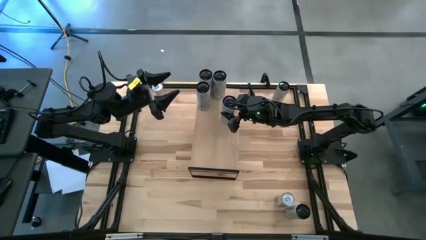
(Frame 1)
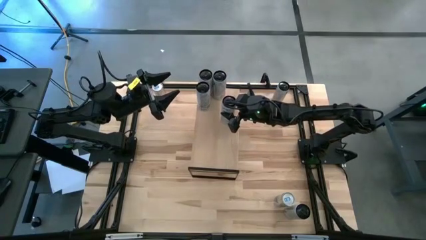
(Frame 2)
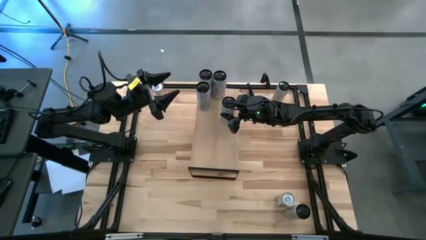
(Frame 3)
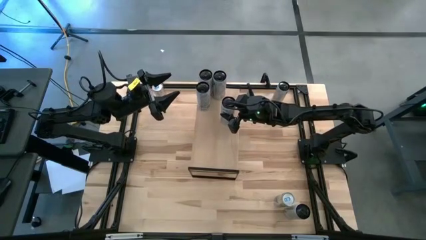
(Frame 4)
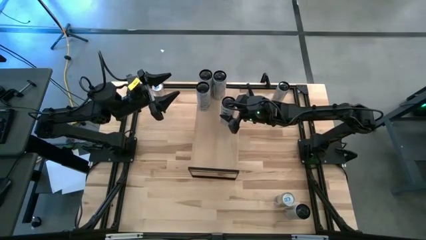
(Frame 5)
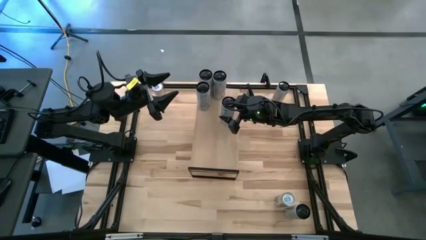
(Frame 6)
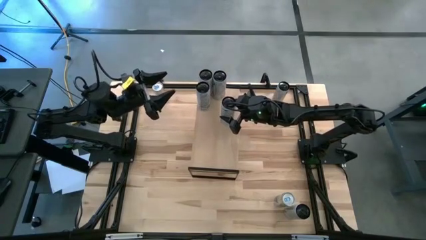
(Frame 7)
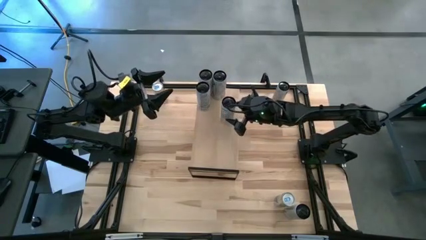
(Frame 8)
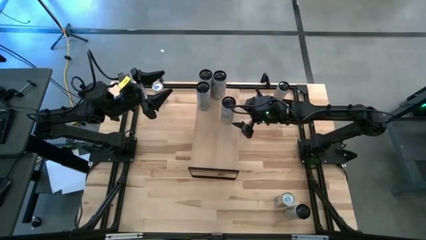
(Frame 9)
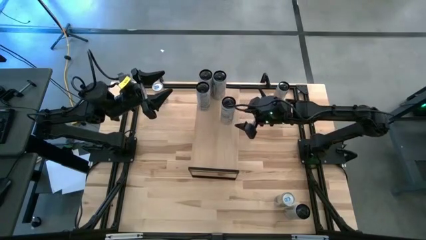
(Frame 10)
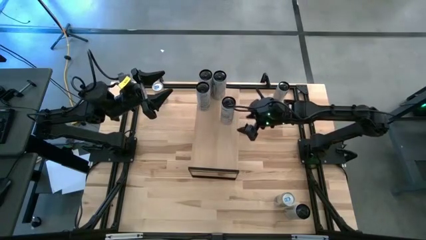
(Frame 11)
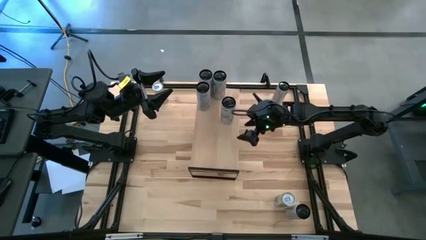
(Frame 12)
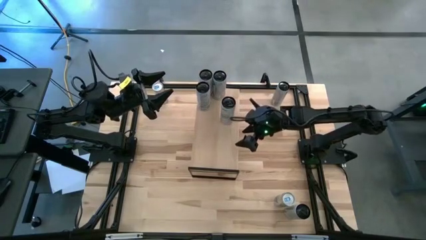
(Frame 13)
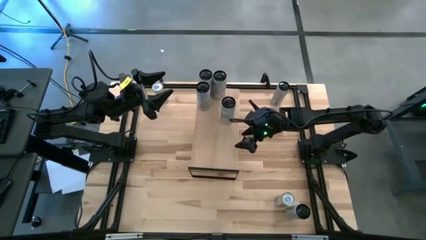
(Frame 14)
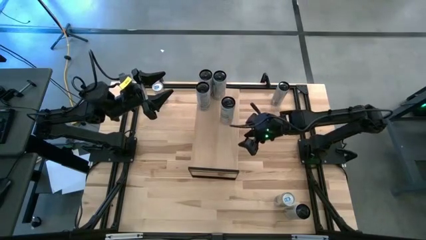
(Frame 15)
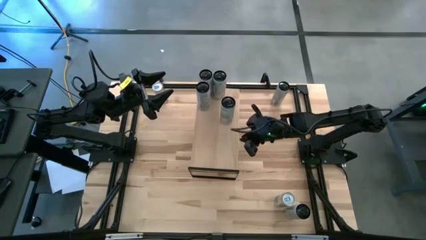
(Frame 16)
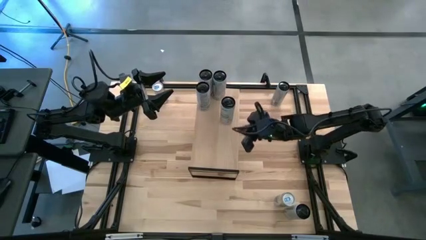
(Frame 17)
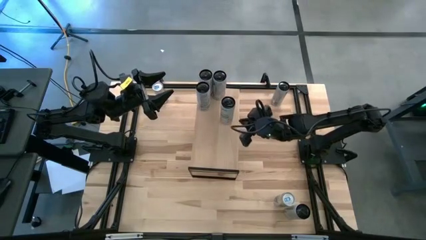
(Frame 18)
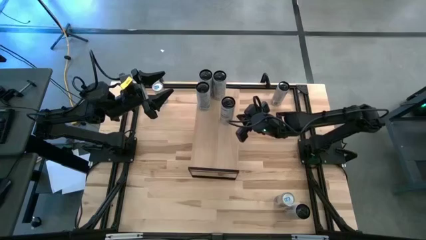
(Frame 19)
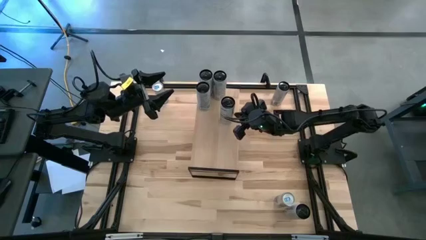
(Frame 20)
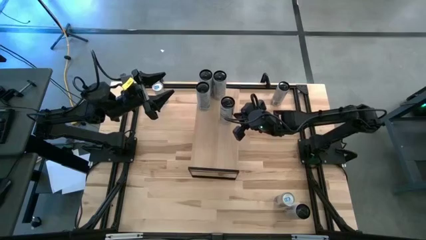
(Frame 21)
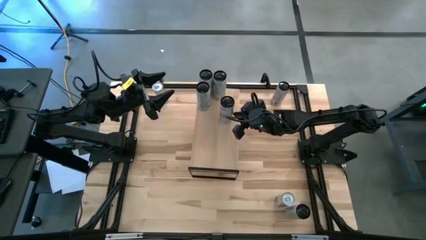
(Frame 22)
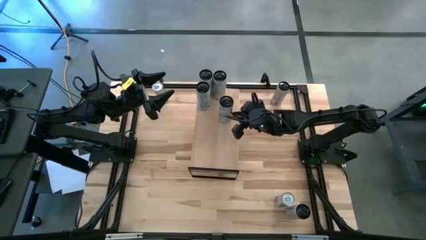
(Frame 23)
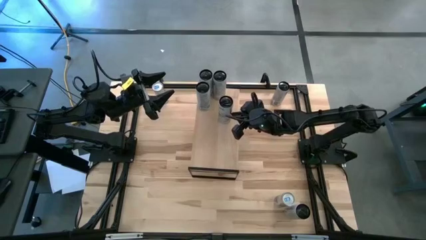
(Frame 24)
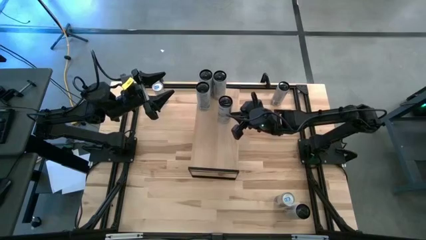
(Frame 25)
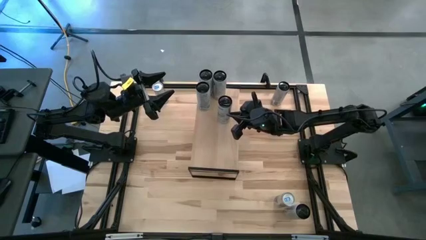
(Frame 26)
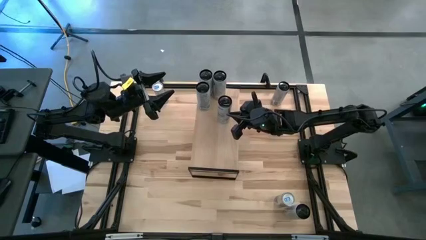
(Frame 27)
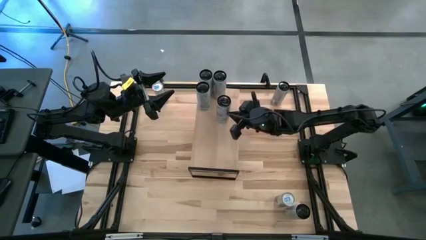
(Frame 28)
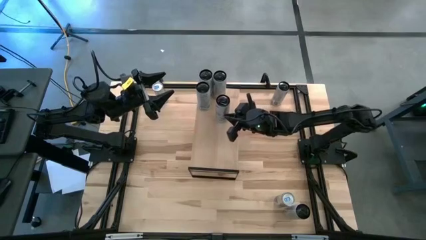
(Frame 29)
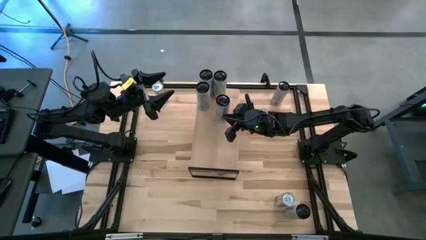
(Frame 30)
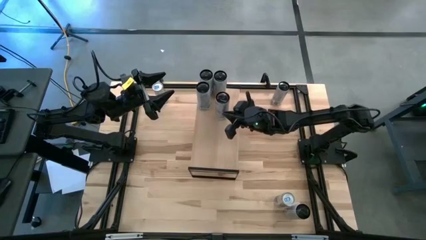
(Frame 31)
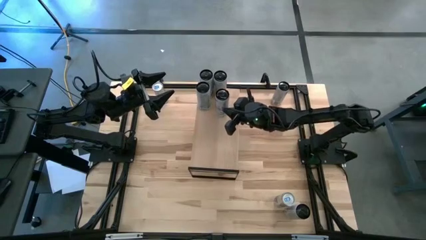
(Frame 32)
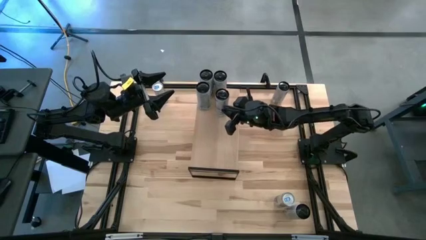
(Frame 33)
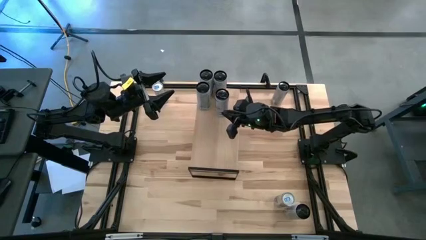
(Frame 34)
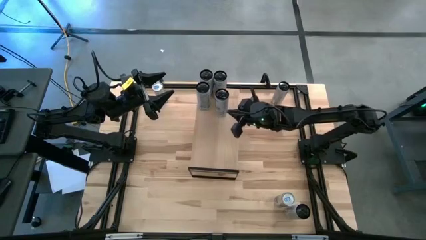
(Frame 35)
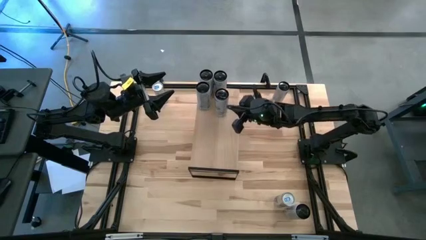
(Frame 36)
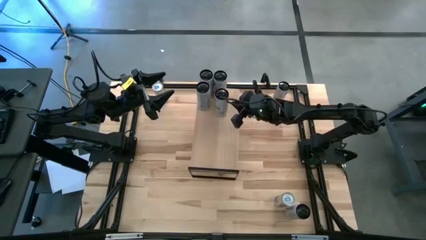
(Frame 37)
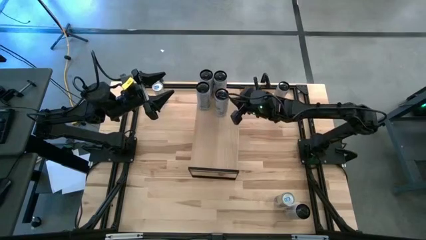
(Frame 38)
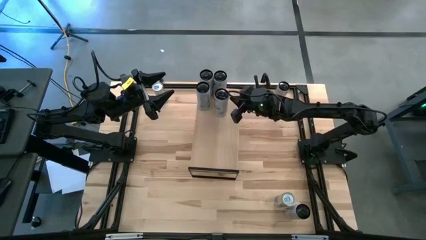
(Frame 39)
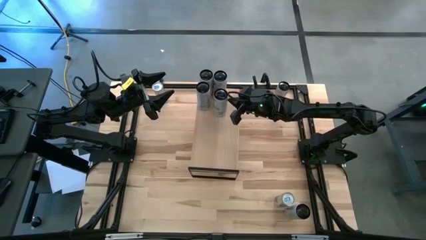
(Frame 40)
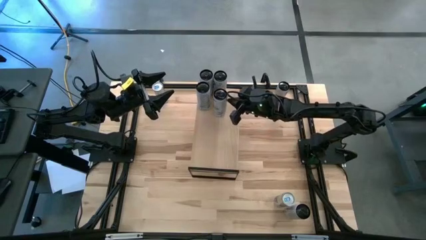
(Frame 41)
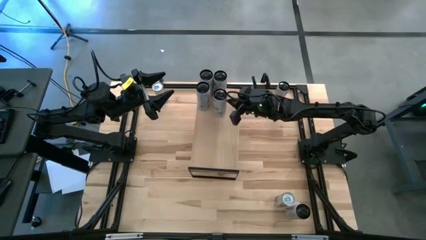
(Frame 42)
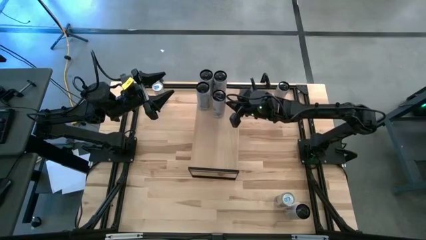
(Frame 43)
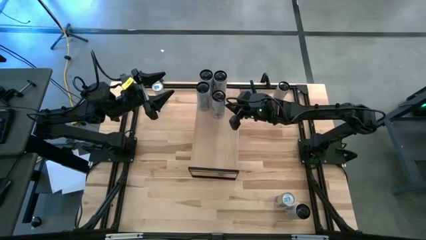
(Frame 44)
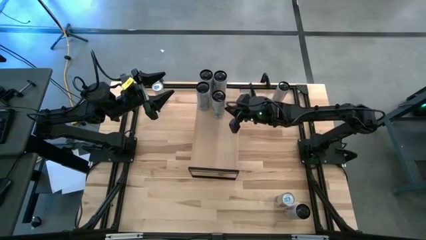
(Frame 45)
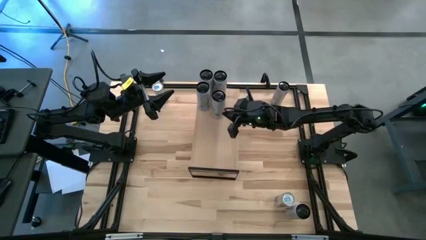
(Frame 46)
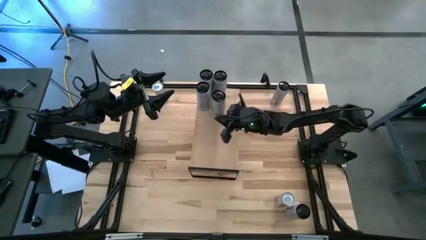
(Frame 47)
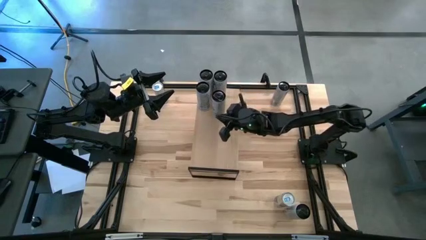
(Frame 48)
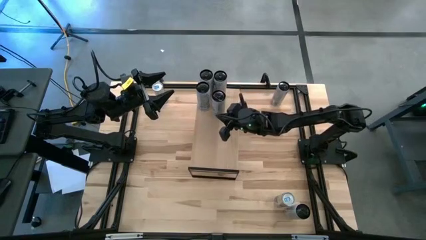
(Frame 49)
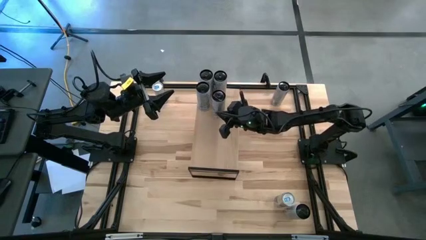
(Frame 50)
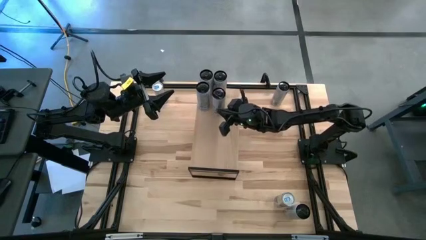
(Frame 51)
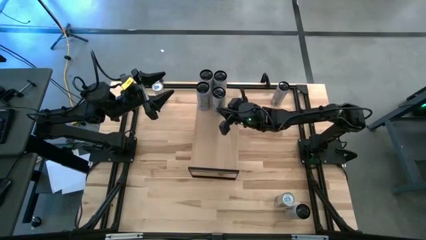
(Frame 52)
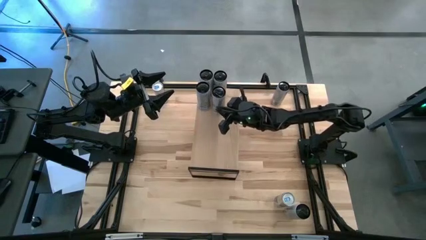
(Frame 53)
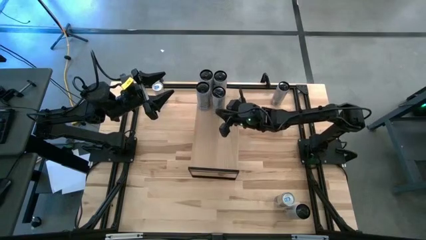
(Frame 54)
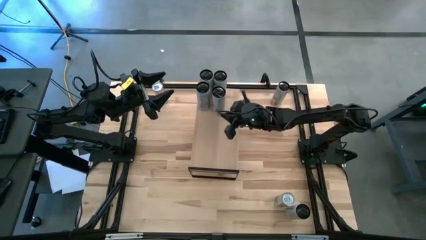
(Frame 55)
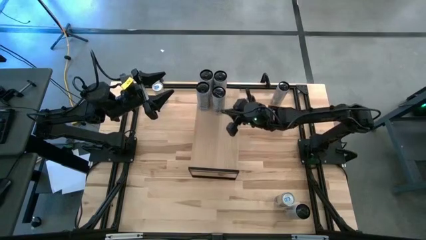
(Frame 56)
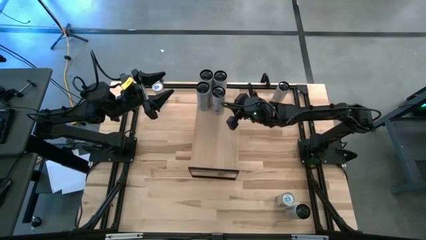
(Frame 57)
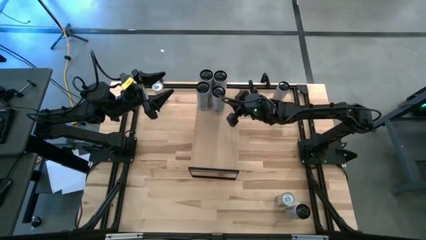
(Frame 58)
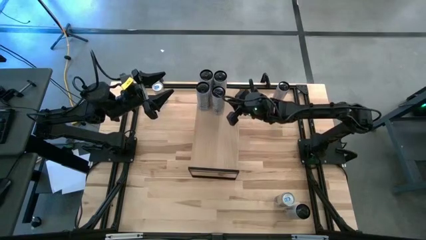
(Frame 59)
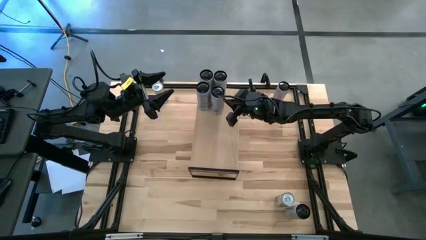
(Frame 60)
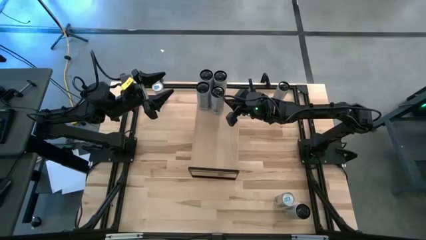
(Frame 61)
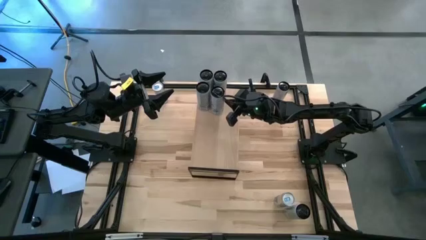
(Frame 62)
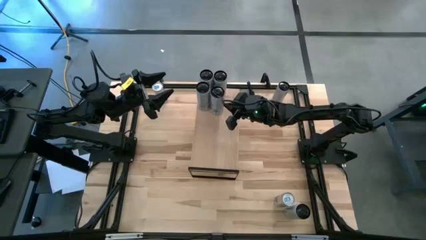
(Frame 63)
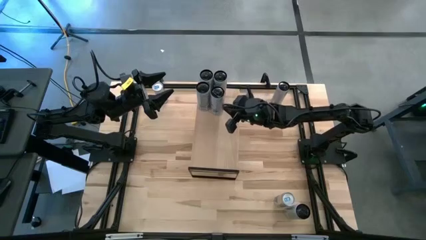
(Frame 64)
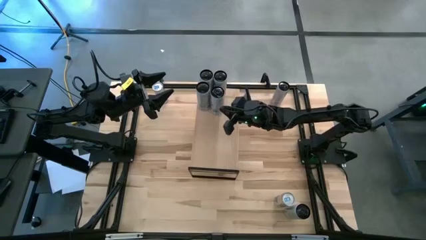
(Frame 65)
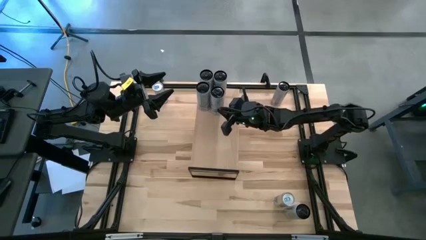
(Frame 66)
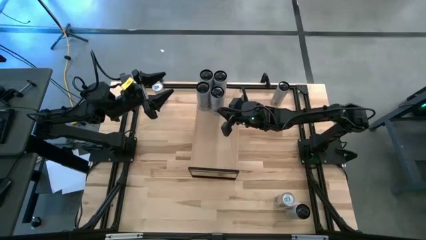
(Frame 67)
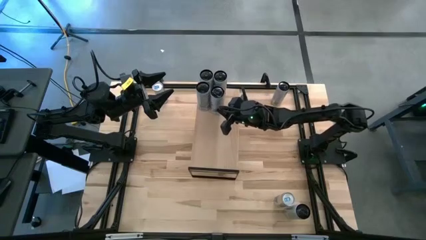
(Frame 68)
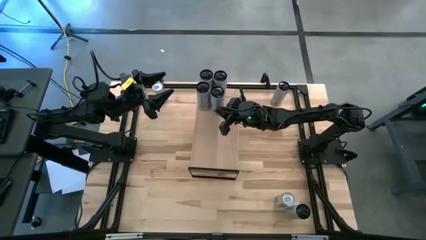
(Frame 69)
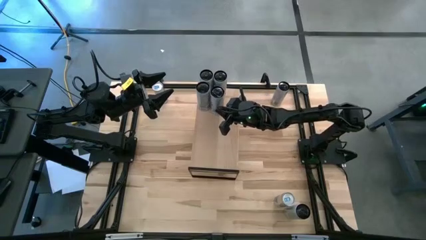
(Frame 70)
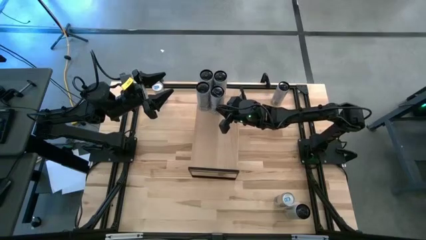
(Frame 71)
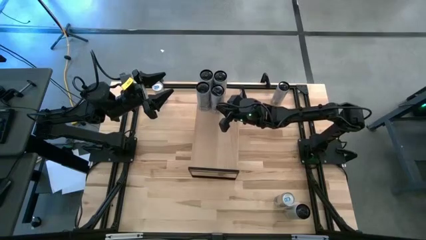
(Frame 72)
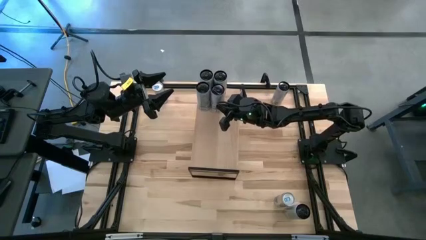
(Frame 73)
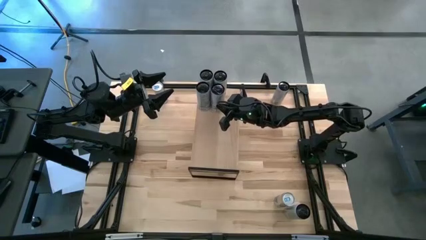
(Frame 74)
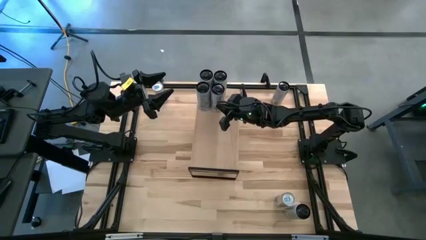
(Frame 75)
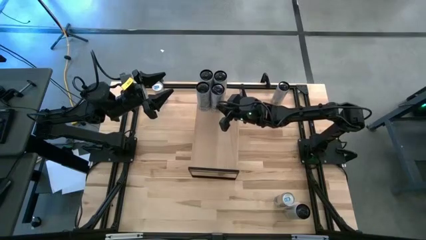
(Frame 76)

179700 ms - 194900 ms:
Task: Place canned beverage on shelf
Put the white blue soda can on the shelf aligned with the white blue soda can
